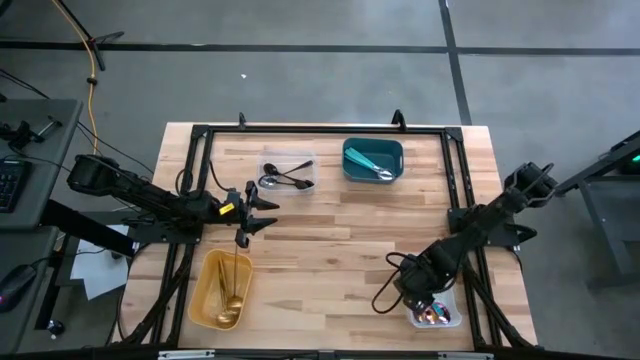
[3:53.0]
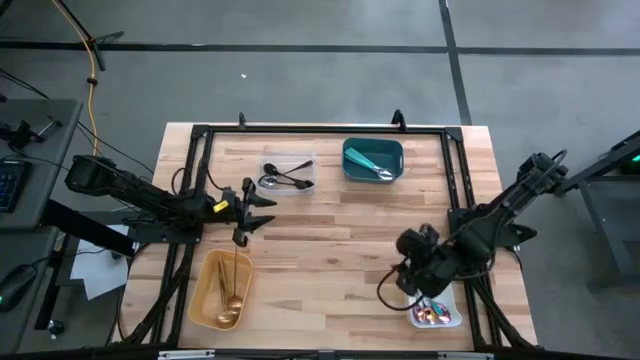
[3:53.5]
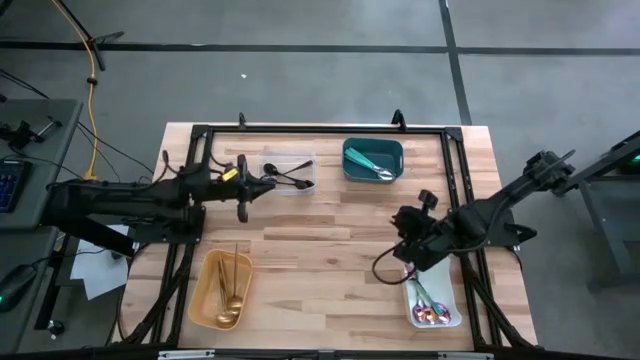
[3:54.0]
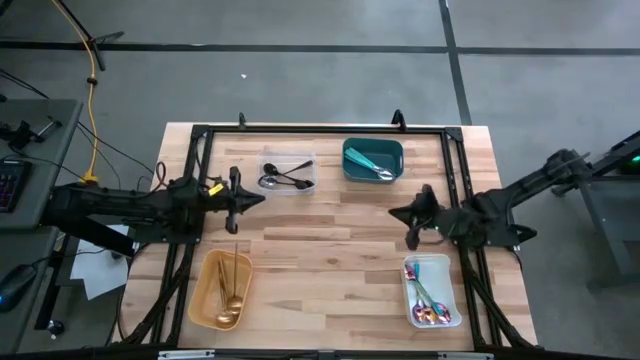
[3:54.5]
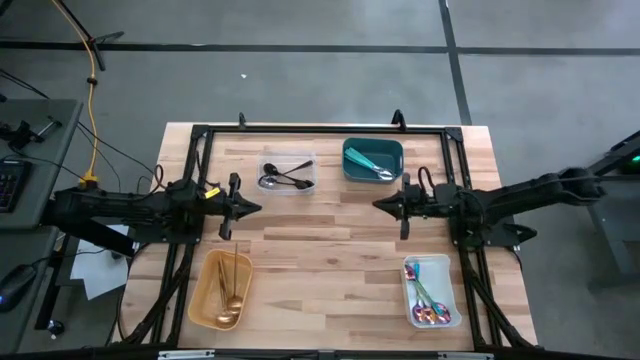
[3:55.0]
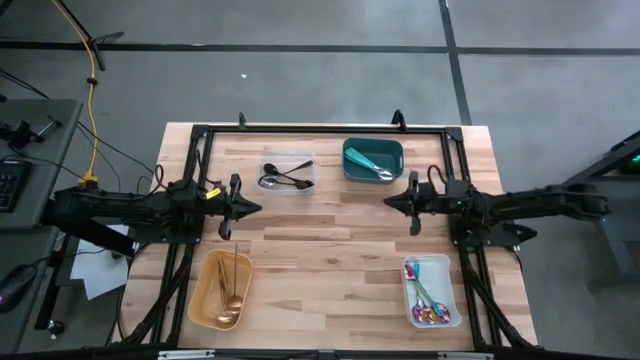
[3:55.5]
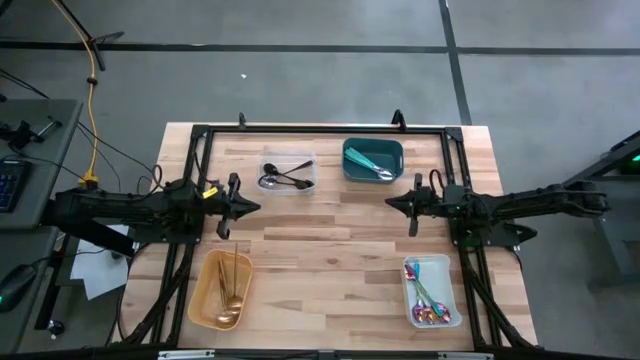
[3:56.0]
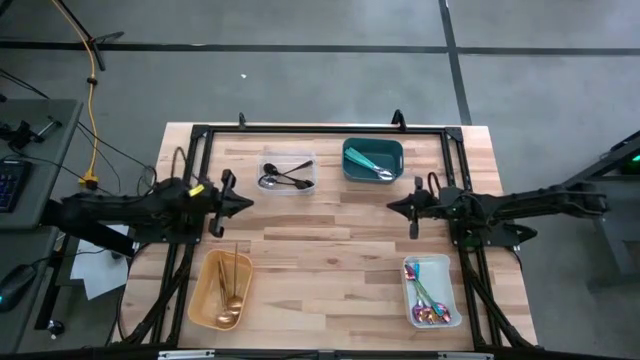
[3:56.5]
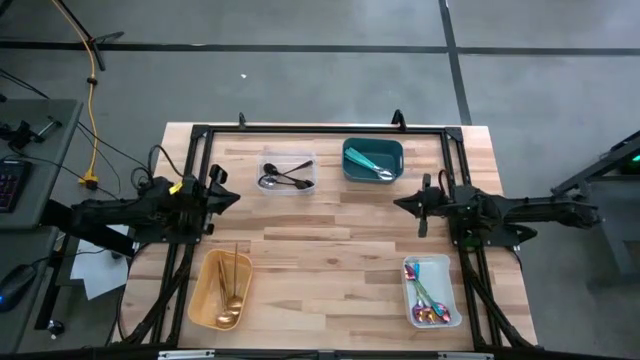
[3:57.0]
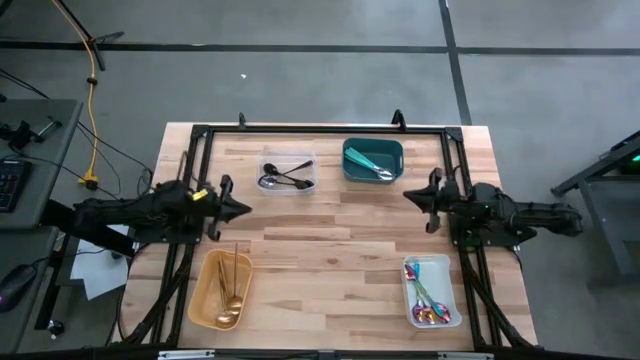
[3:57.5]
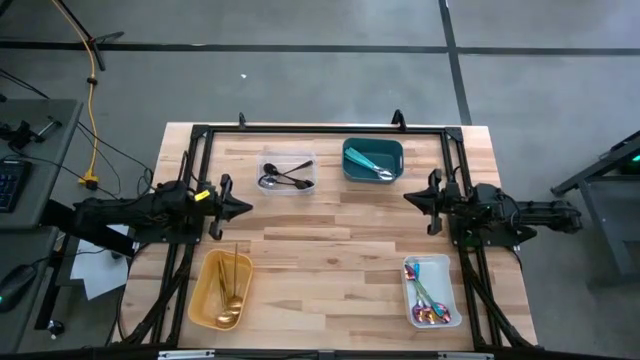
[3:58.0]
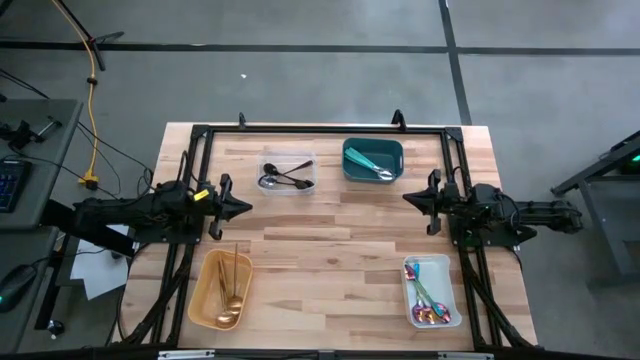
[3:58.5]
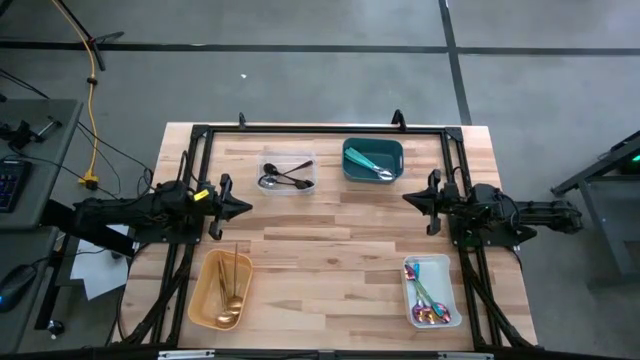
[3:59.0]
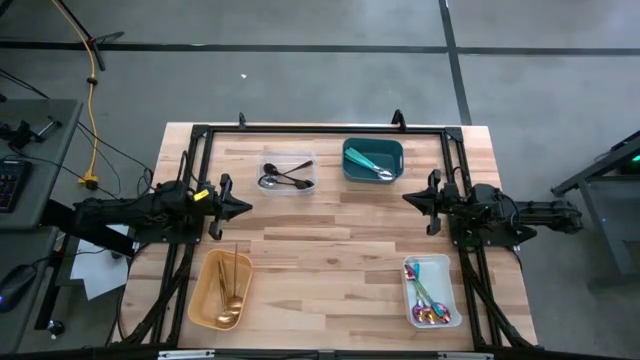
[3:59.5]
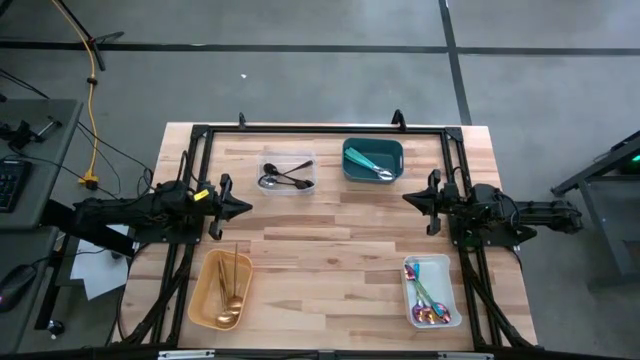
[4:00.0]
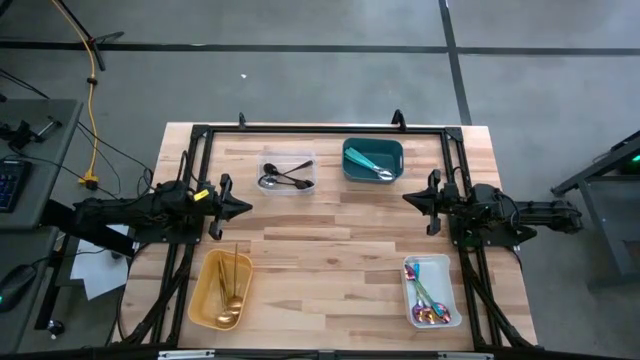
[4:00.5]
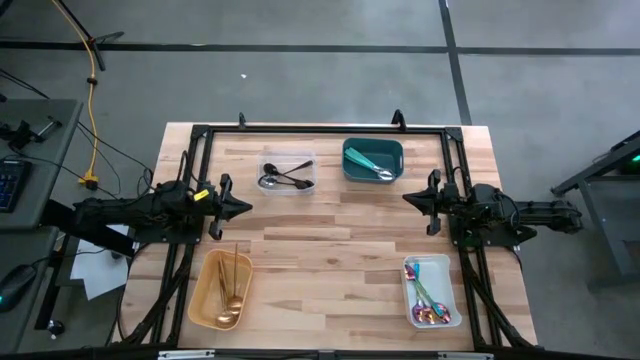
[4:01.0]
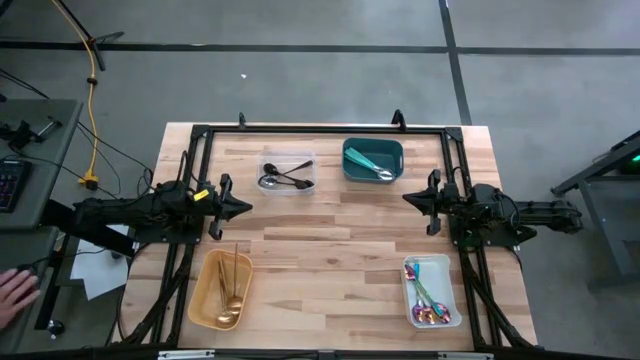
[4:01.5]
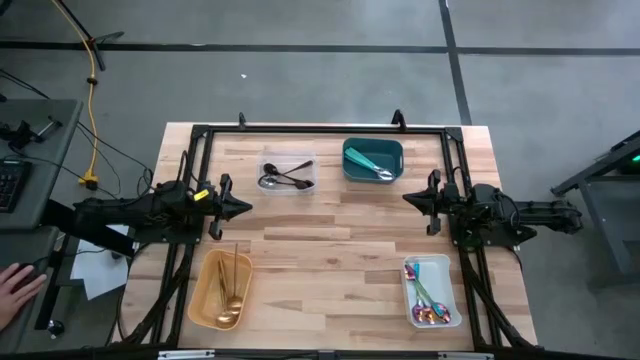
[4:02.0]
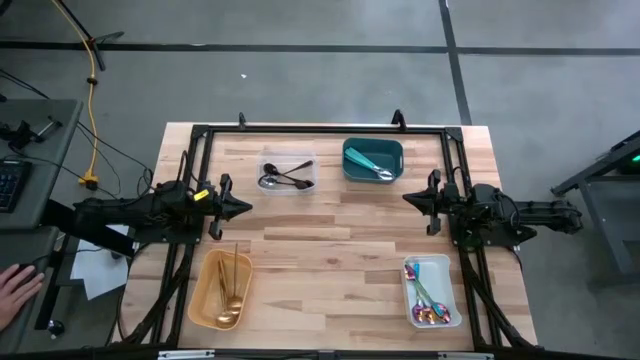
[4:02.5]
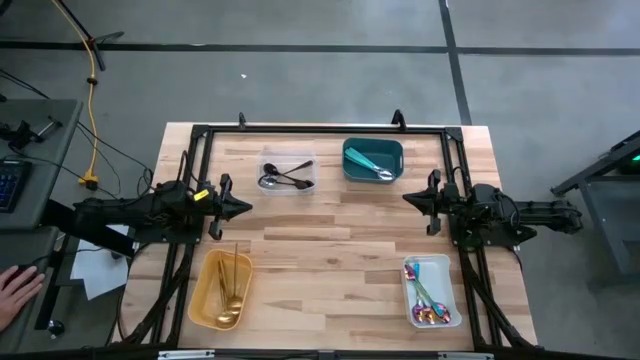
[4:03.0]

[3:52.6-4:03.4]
Task: Sort silverware by color (type)
Return to Home Position

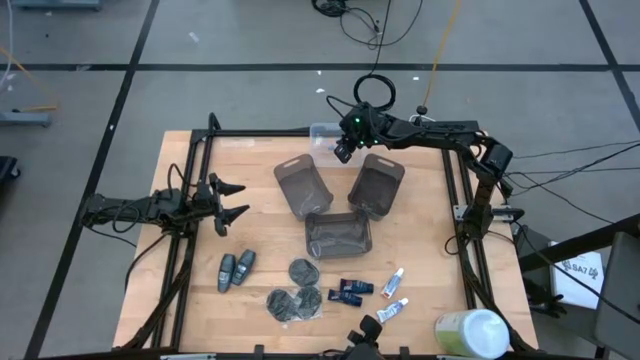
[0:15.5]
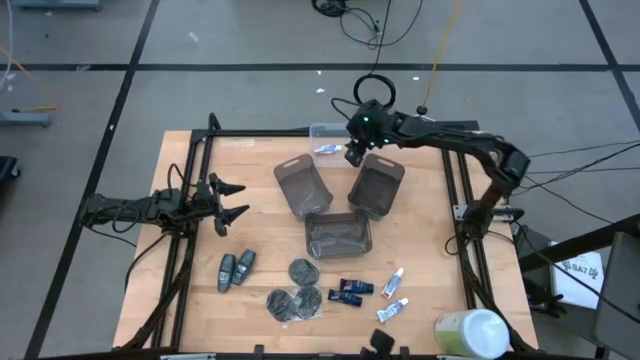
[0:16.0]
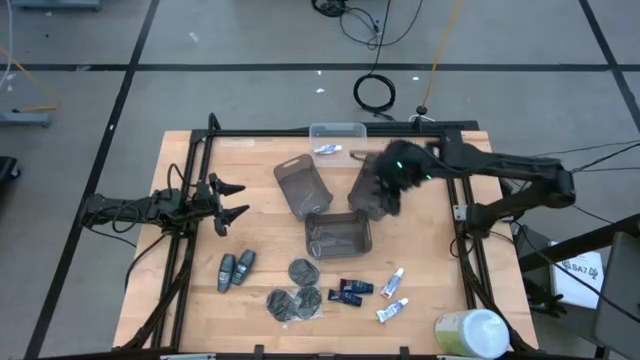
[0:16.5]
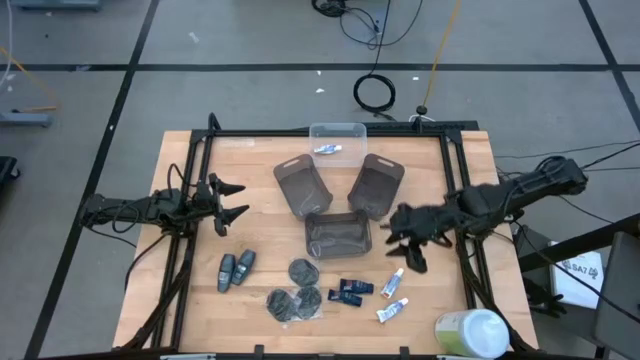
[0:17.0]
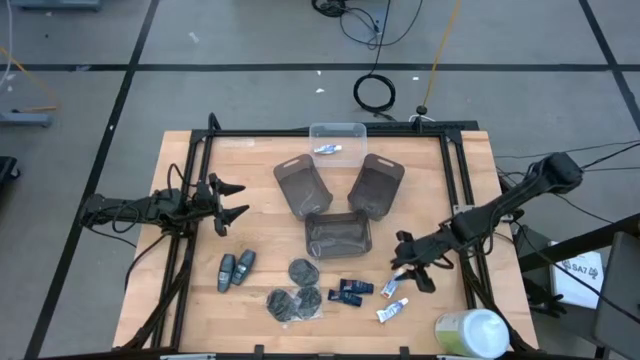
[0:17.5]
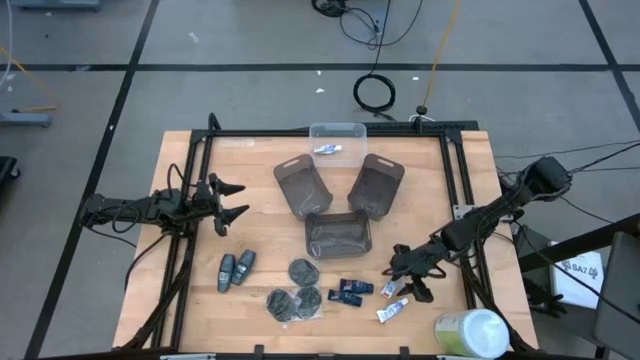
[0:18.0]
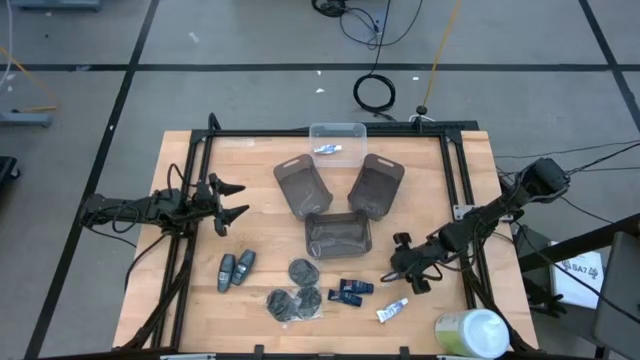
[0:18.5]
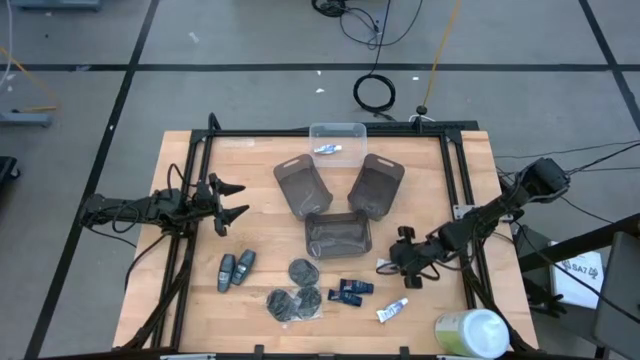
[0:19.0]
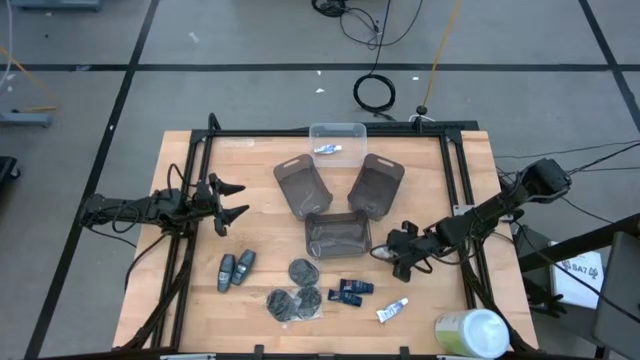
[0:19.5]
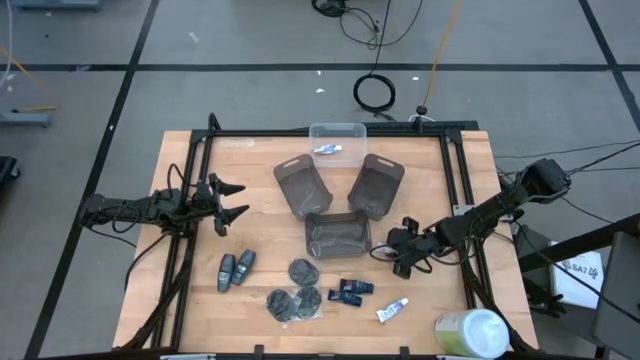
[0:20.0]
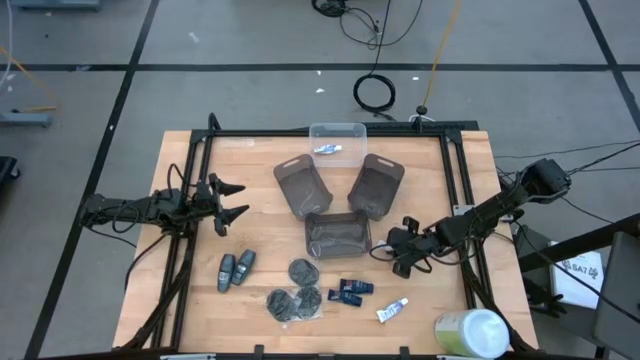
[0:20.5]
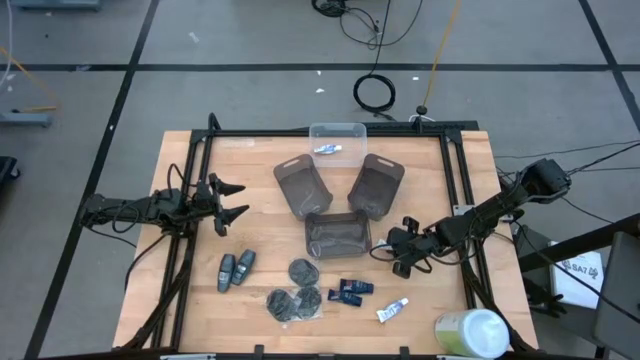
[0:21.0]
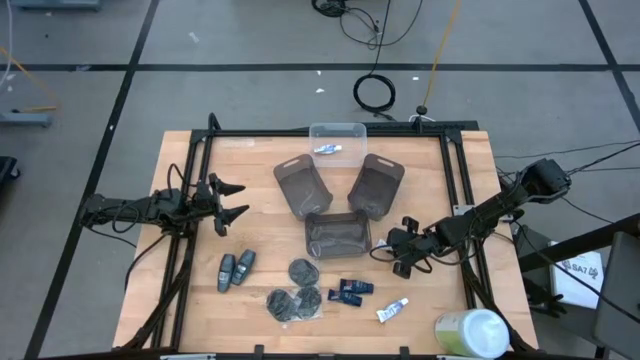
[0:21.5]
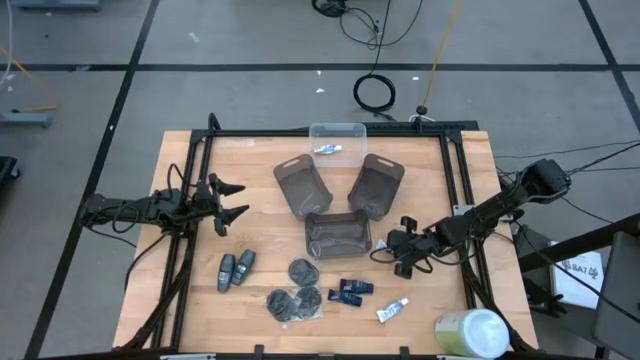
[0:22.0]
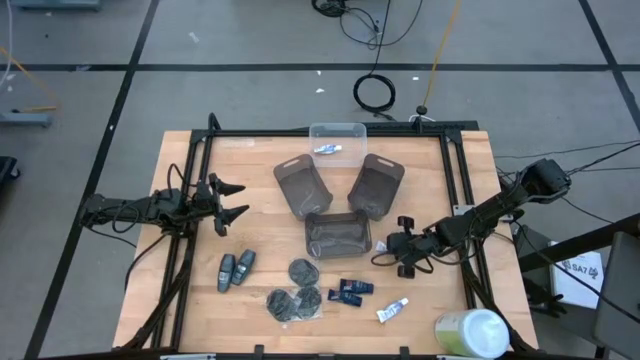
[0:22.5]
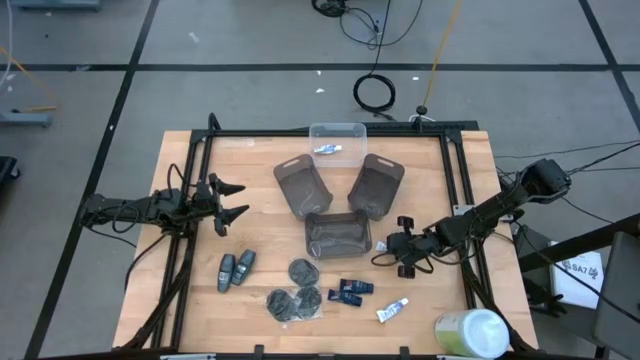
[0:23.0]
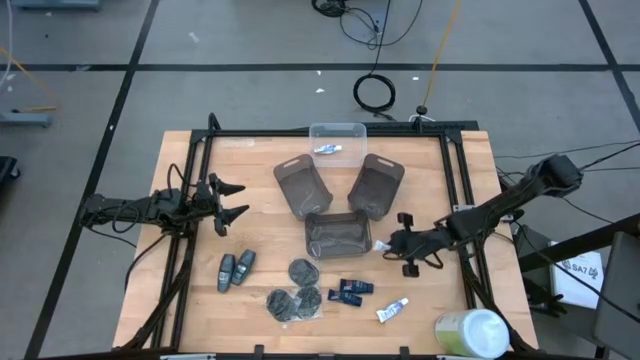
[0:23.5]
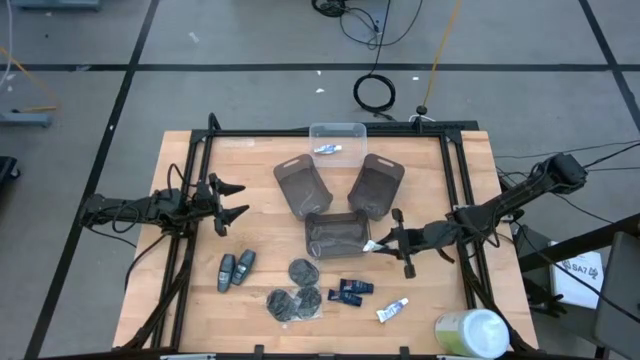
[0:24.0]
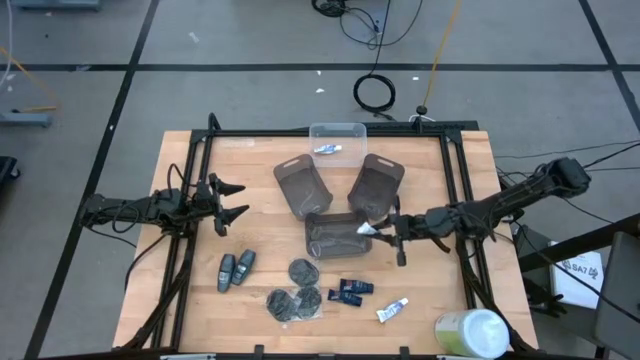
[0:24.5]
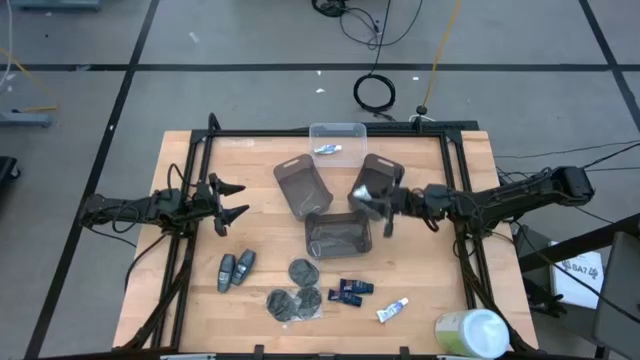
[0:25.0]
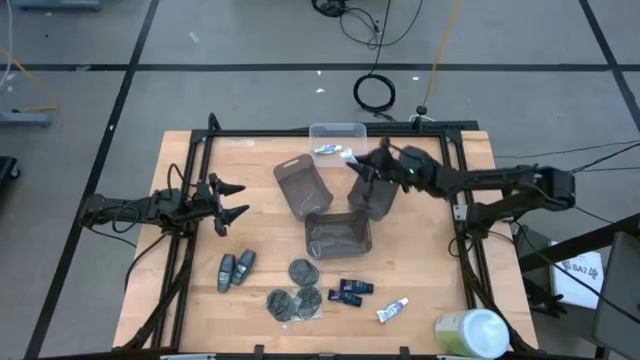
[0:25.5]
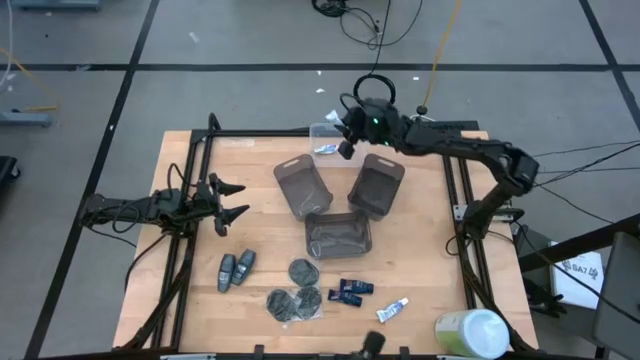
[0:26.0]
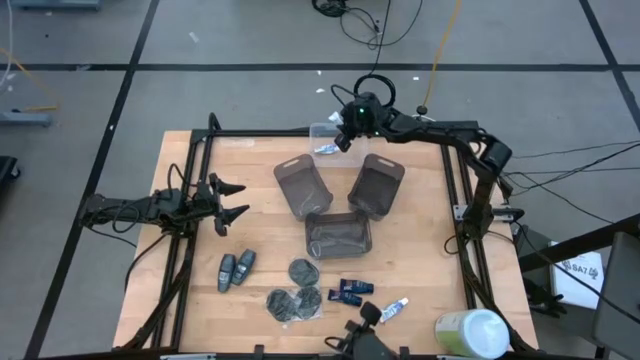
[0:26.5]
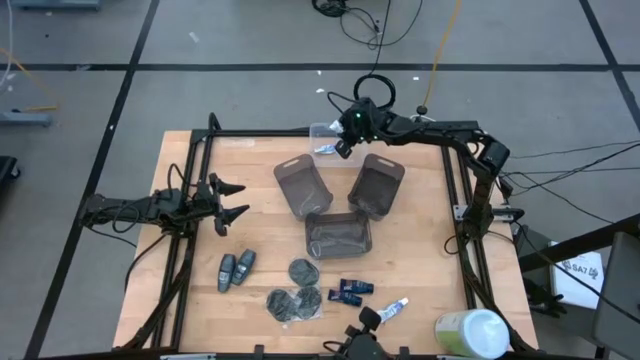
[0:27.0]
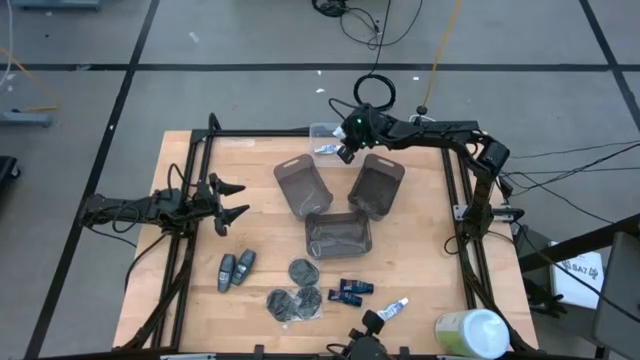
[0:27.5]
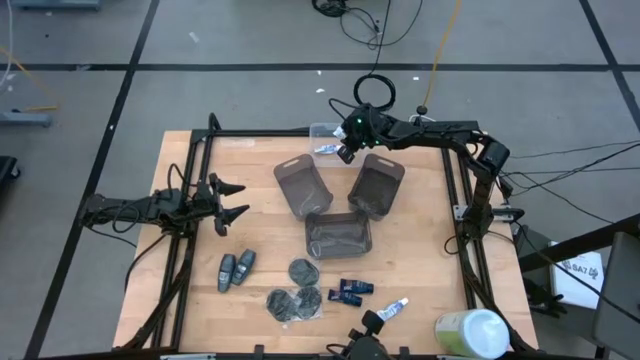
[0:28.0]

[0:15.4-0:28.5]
Task: Pick & Place Travel size toiletries
Put the top white toothpaste tube into the white transparent bin
